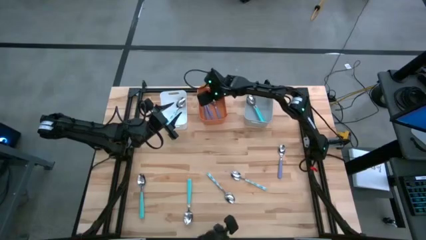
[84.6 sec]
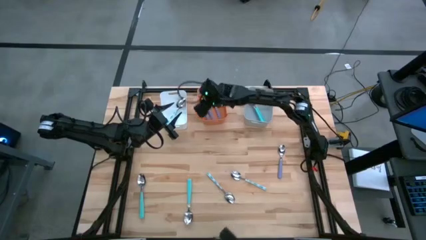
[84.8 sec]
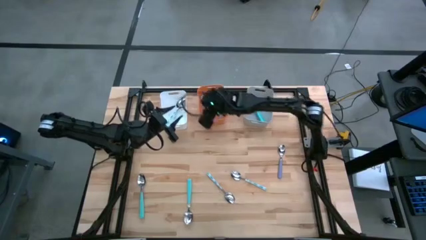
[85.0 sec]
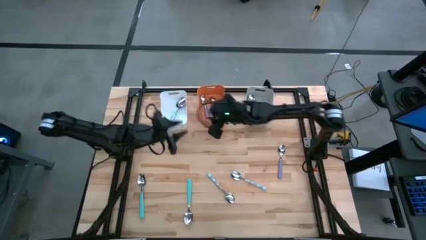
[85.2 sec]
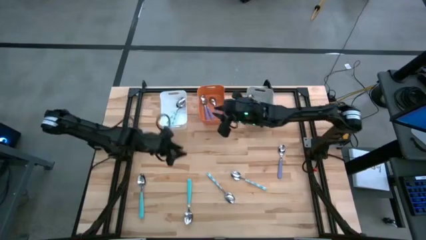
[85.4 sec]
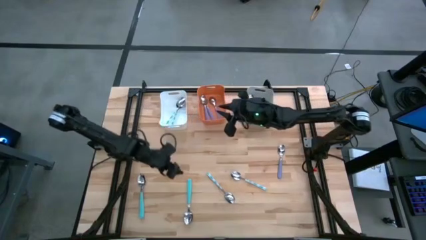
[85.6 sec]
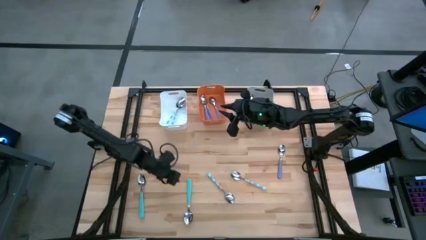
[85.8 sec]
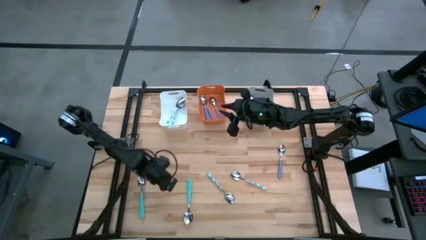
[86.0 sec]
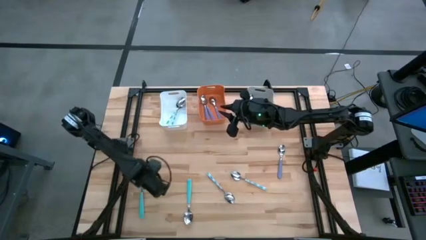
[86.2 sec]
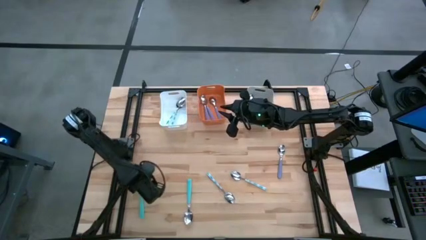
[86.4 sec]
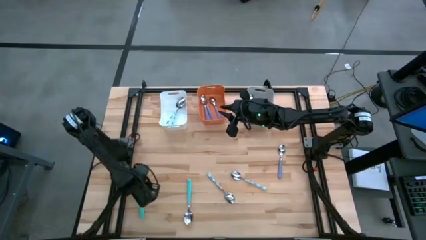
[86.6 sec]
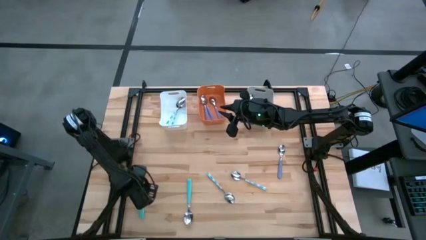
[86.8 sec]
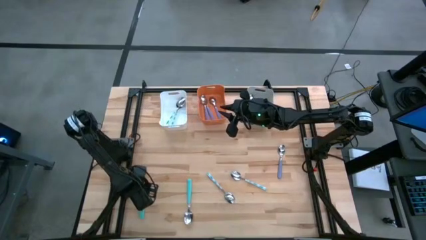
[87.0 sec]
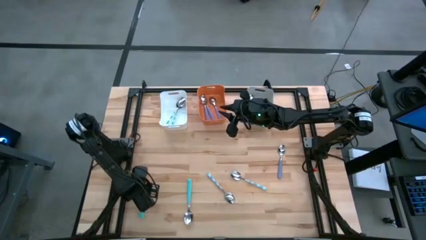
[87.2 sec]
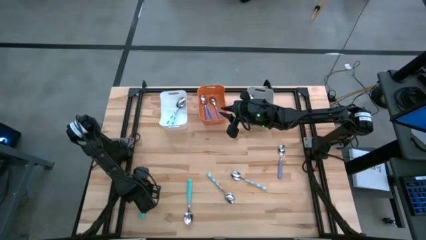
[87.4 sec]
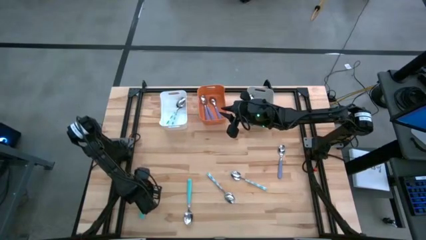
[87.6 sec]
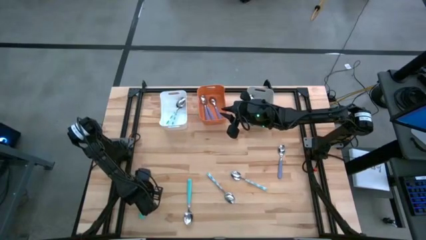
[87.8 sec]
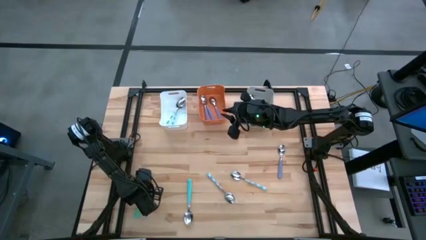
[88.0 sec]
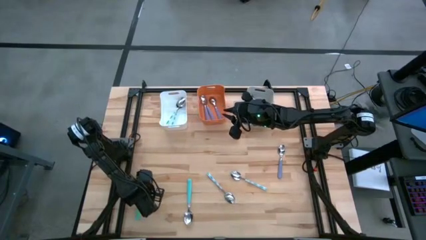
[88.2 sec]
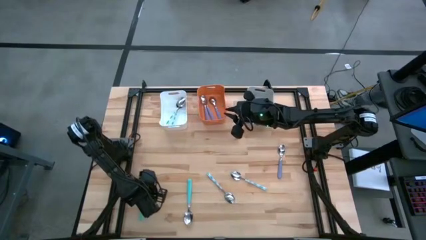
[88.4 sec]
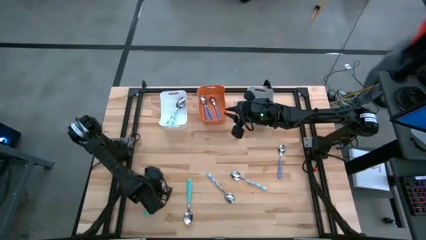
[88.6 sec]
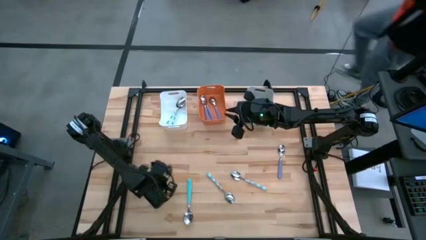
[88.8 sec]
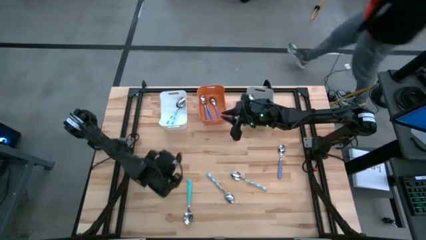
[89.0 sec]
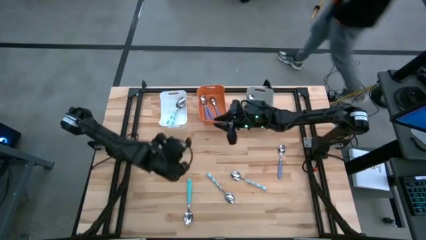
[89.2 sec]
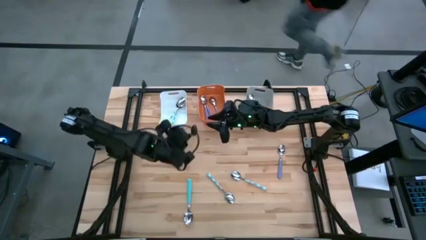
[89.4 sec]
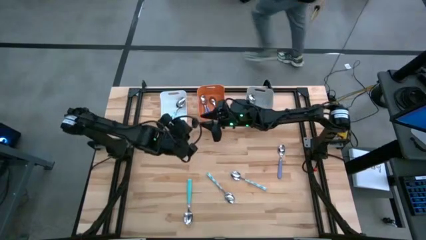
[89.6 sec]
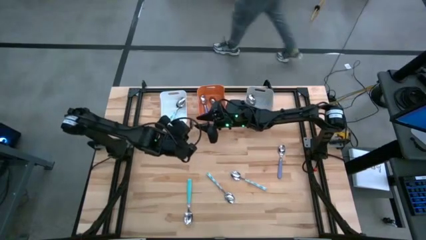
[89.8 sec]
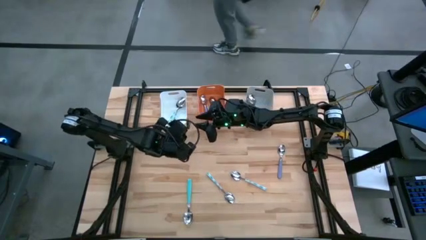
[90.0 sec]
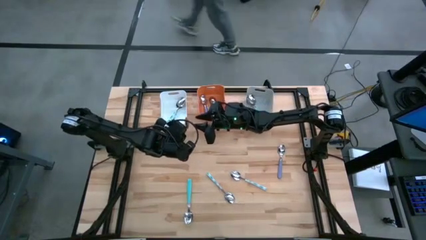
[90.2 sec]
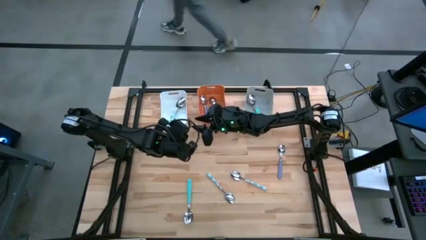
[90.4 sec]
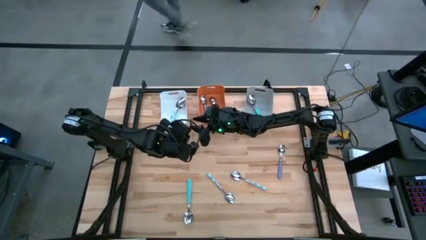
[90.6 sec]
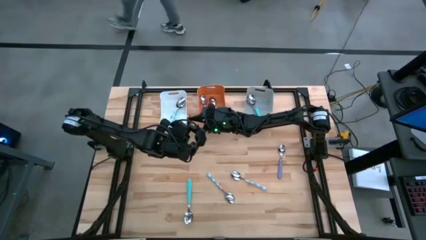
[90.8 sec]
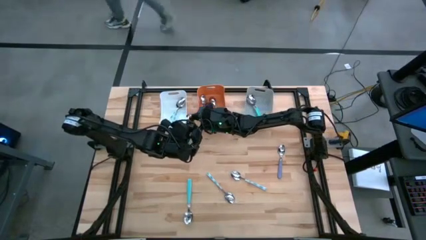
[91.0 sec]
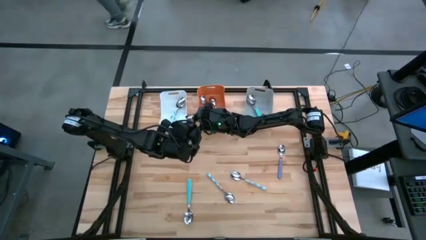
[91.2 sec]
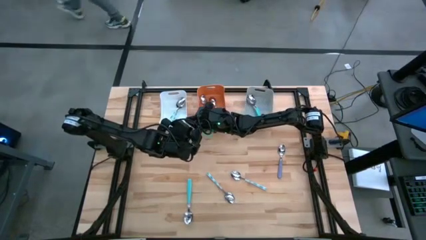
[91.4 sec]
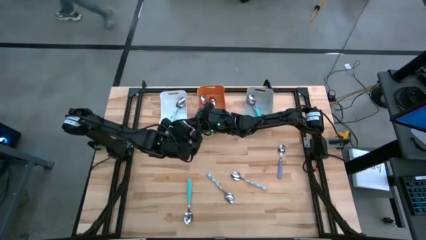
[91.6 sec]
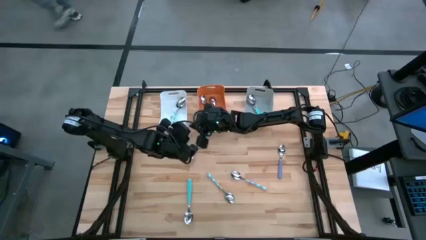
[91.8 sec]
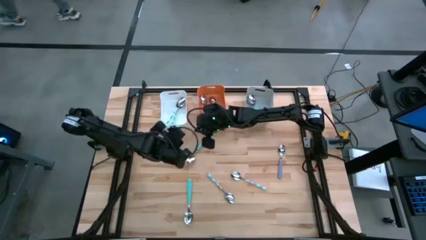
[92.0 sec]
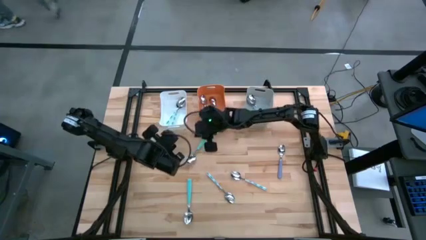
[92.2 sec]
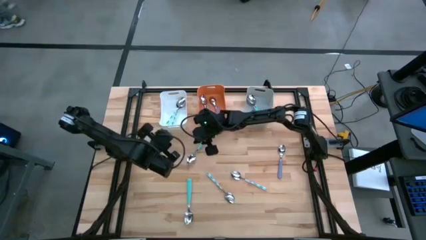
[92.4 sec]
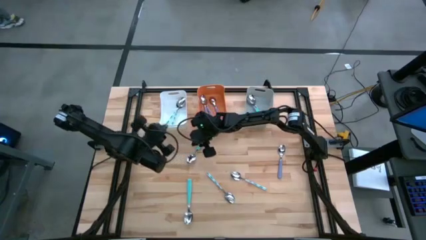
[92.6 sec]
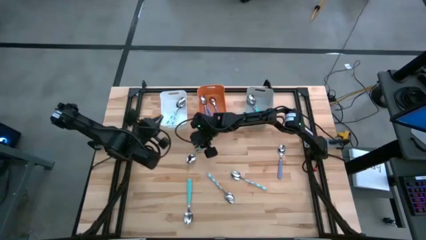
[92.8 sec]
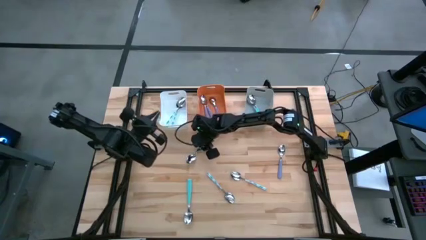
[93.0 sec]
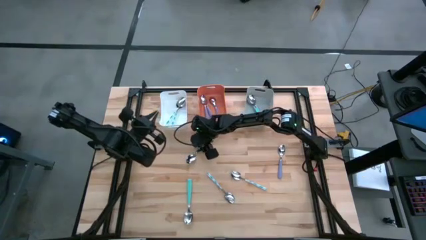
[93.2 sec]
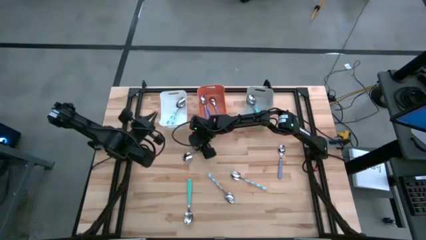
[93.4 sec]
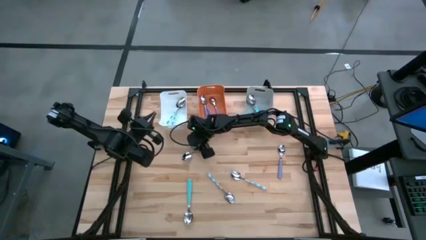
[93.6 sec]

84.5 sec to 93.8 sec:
Task: Sort silverware by color (type)
Put the green spoon into the gray bin

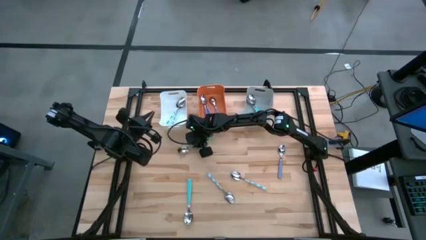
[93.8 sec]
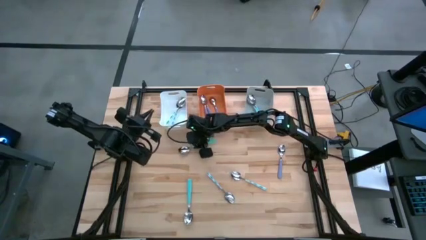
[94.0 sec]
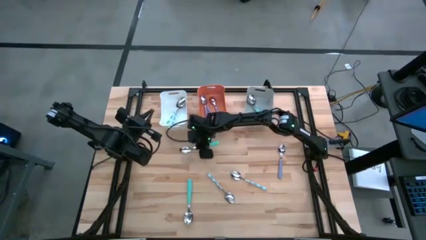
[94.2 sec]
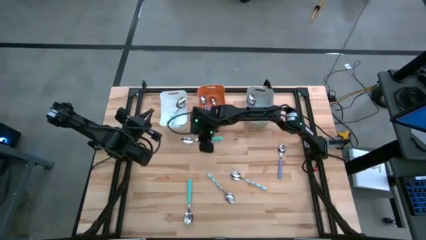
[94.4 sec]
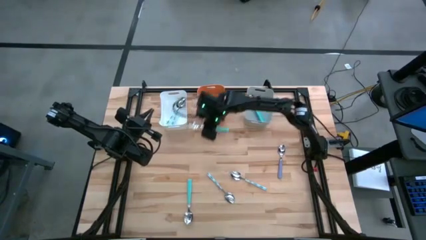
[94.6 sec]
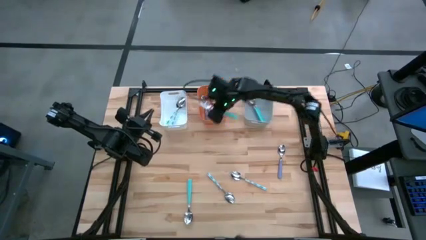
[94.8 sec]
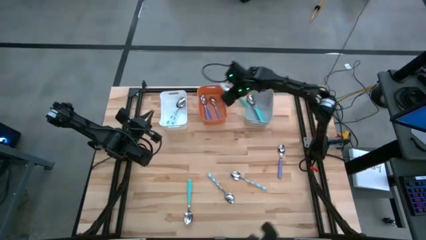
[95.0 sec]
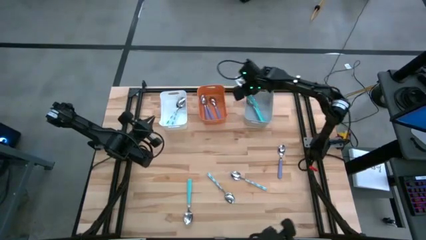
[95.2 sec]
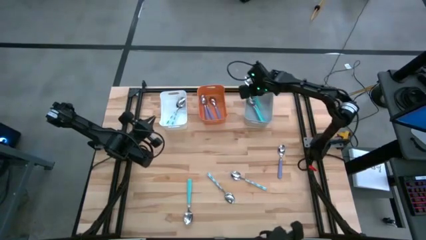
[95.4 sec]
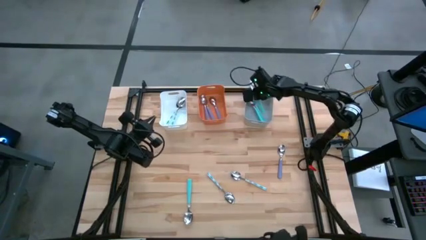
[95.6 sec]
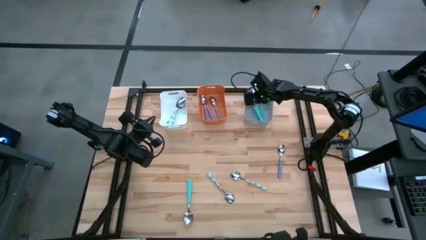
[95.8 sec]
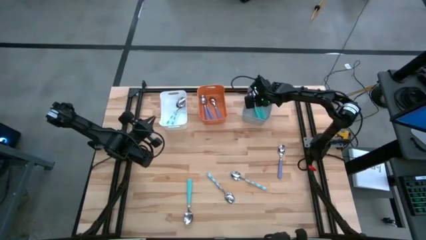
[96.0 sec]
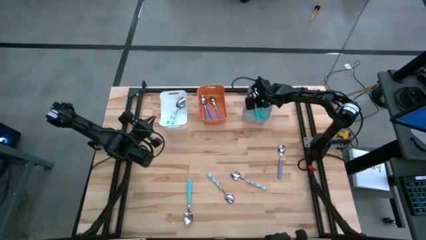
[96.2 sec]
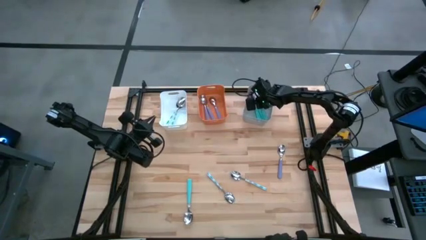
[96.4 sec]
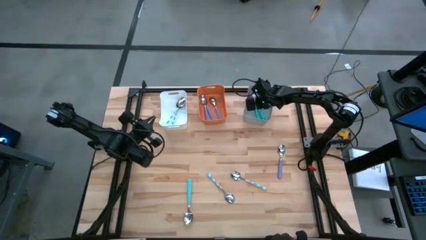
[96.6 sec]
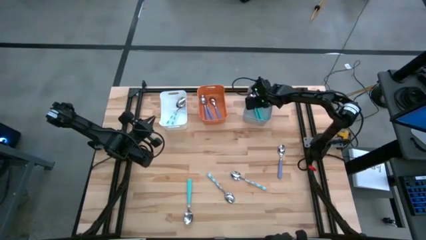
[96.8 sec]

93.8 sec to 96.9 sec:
Put the green spoon into the gray bin
